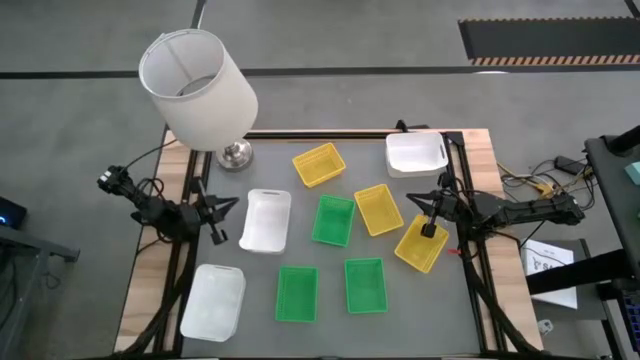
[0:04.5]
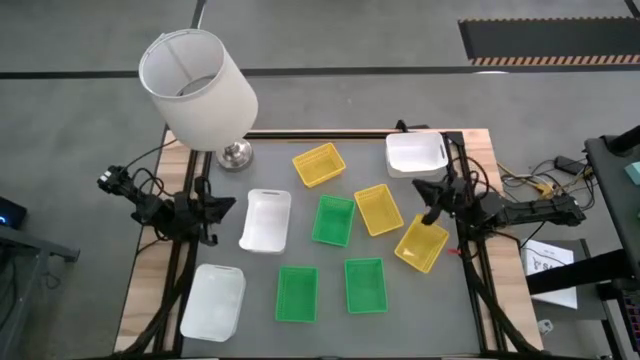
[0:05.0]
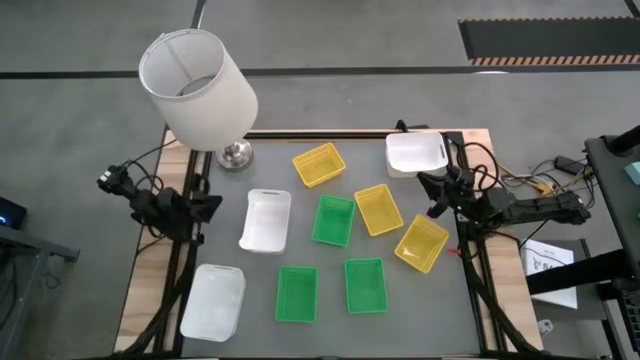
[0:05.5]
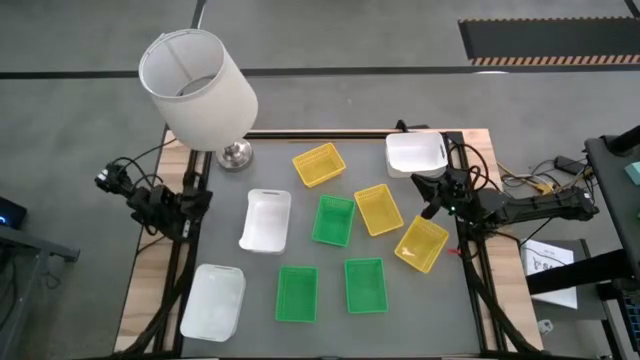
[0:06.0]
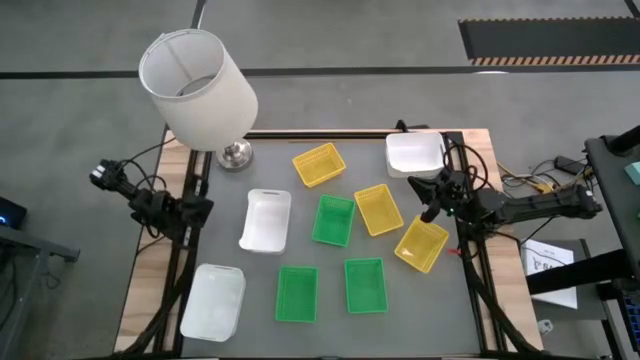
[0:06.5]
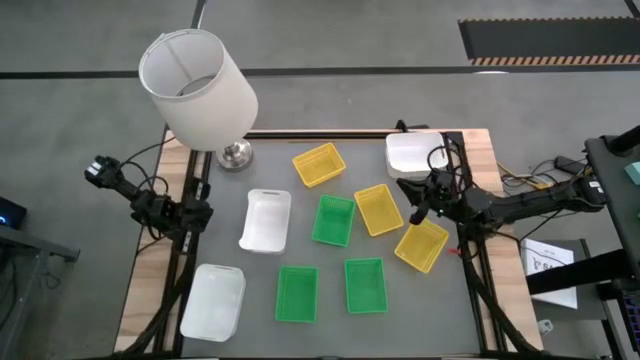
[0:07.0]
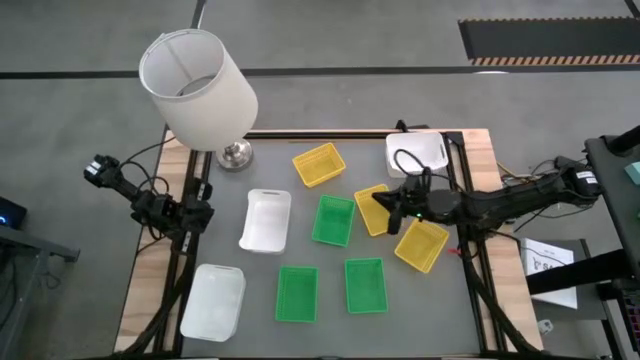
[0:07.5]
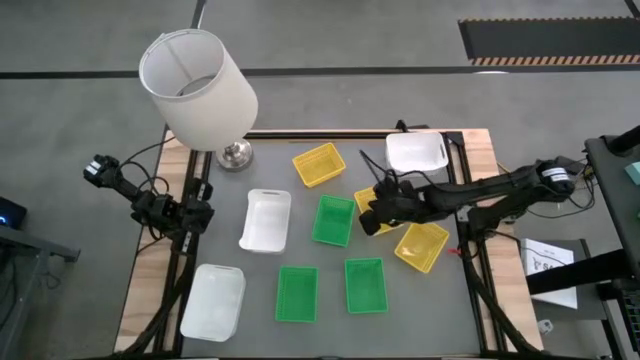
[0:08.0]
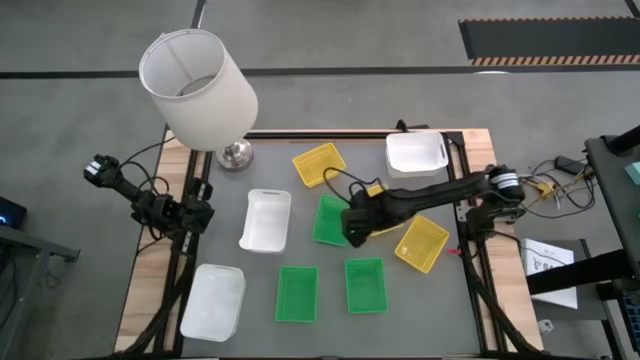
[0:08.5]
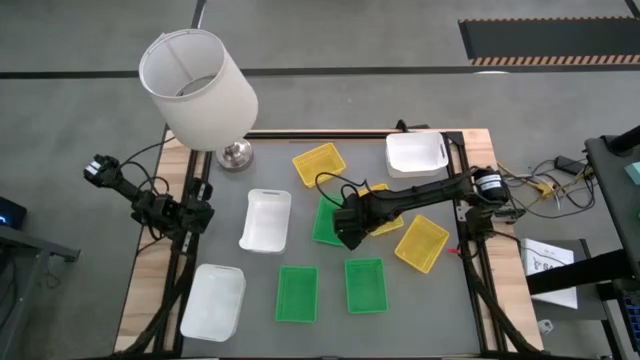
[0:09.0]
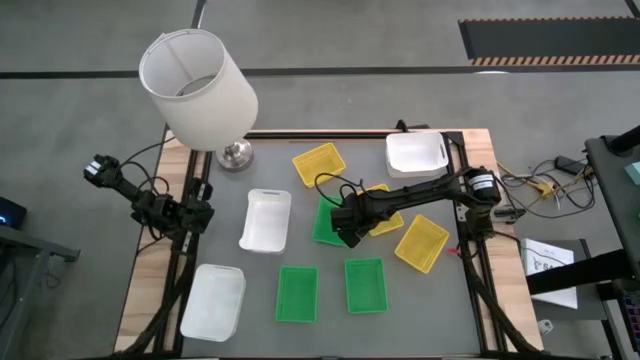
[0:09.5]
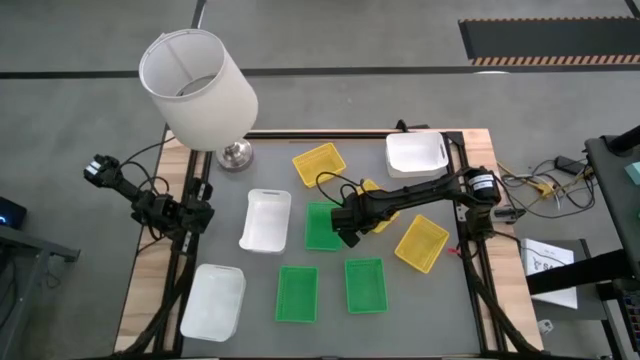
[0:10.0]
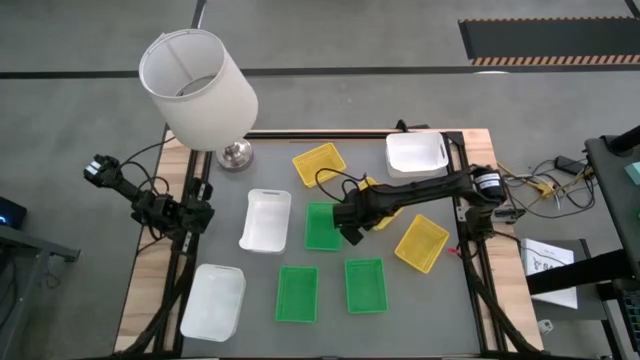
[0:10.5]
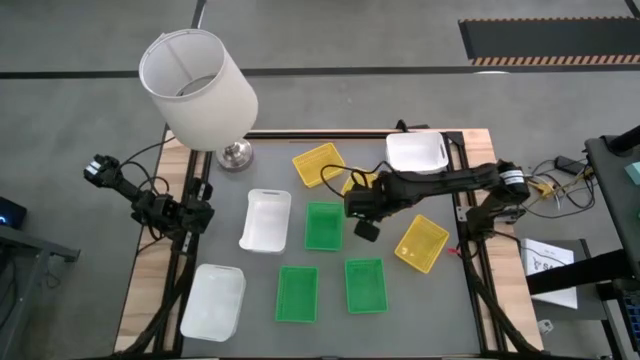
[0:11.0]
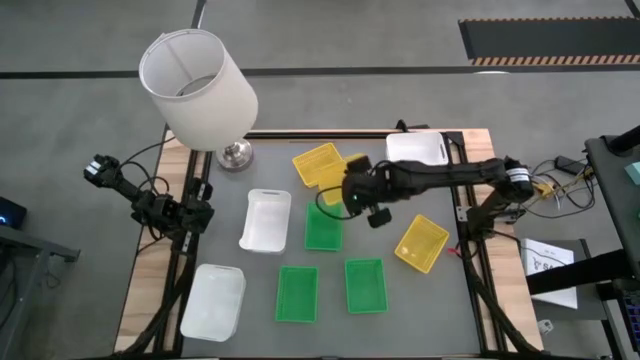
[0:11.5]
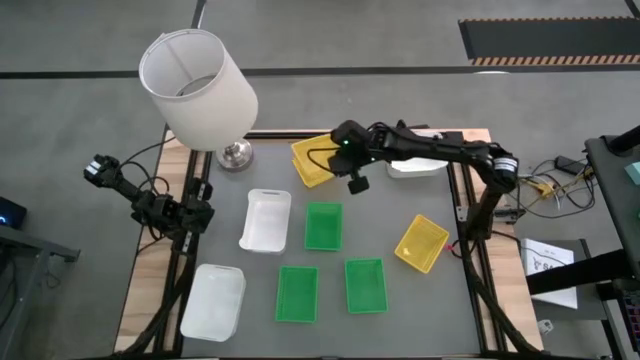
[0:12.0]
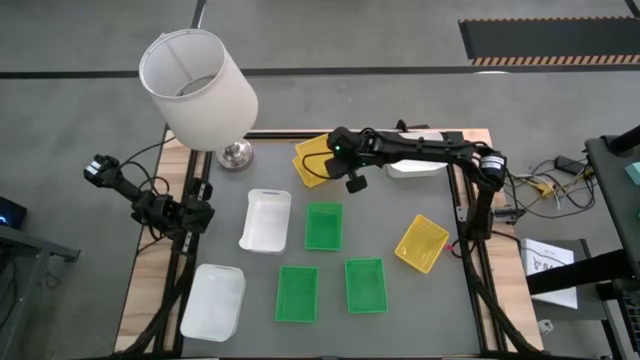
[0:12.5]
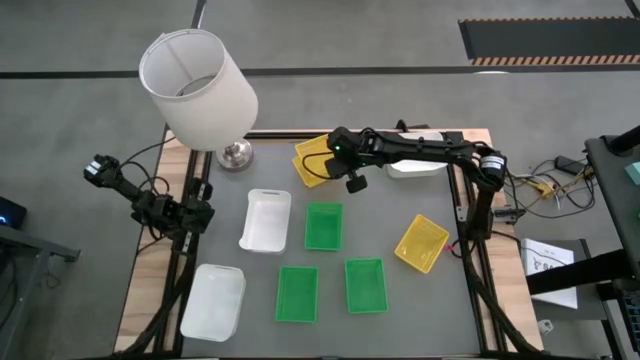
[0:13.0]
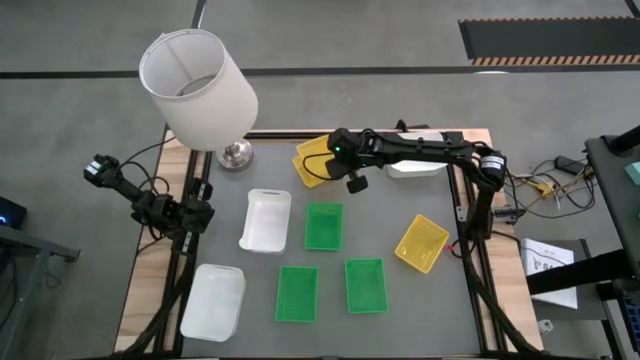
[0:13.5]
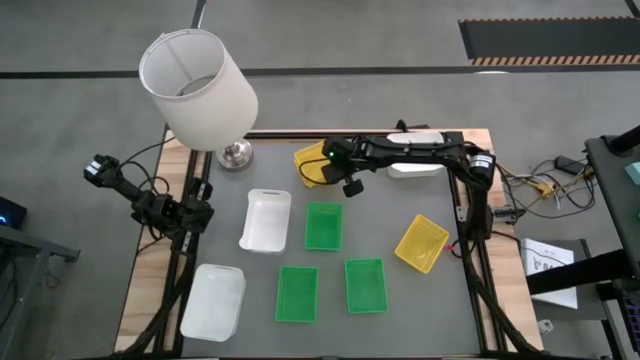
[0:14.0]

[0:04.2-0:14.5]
Stack the middle yellow bin on the left yellow bin

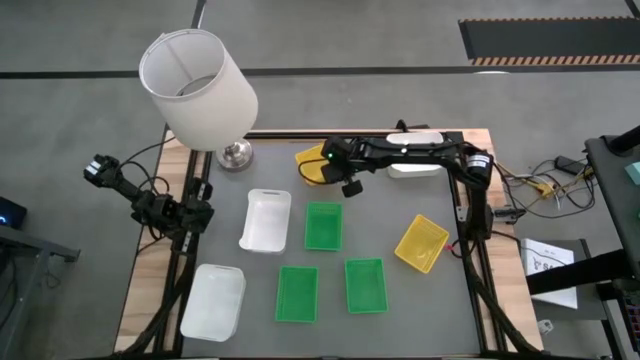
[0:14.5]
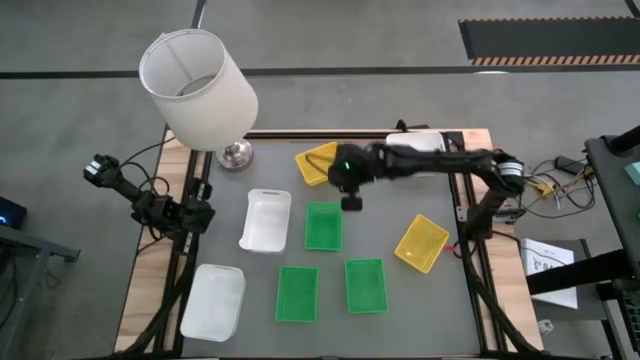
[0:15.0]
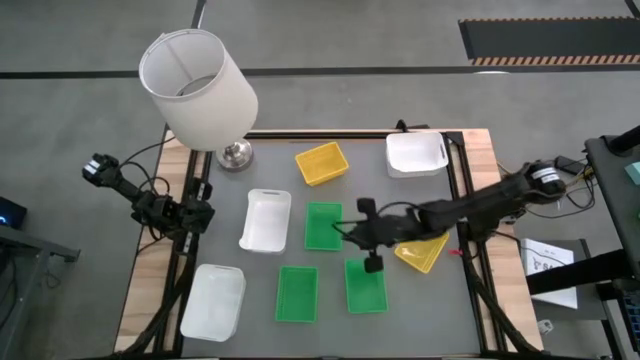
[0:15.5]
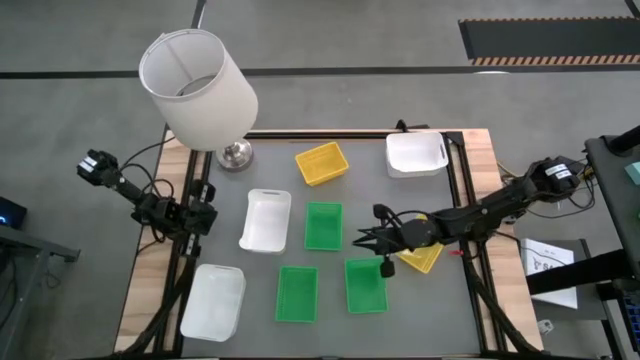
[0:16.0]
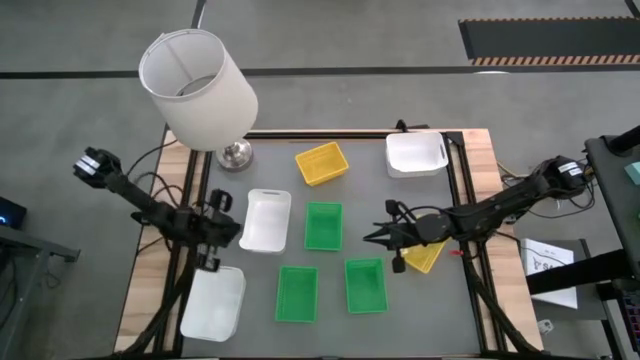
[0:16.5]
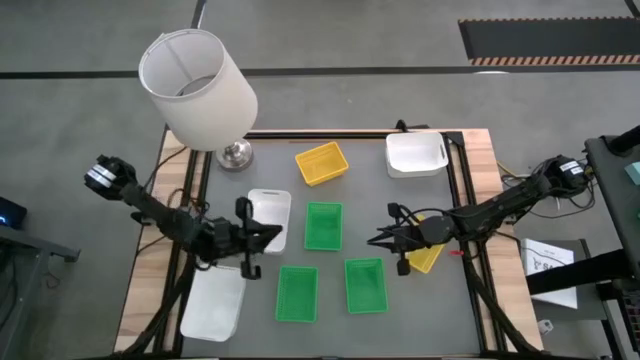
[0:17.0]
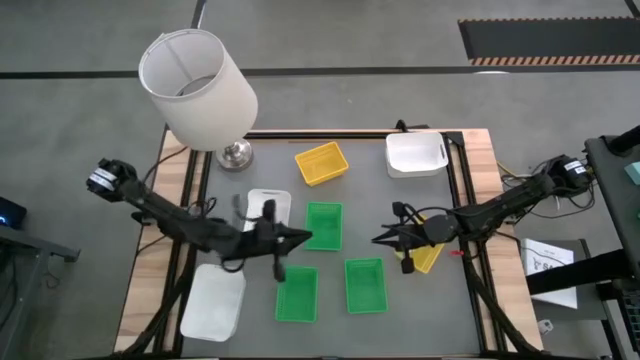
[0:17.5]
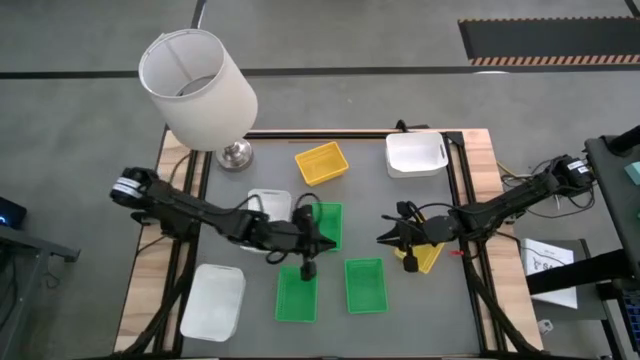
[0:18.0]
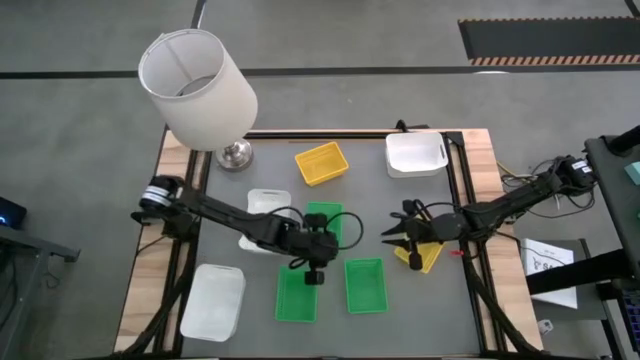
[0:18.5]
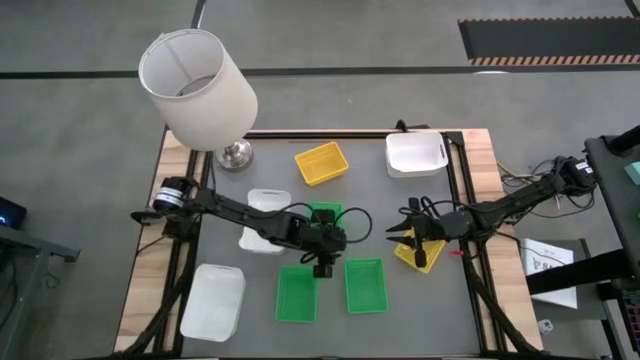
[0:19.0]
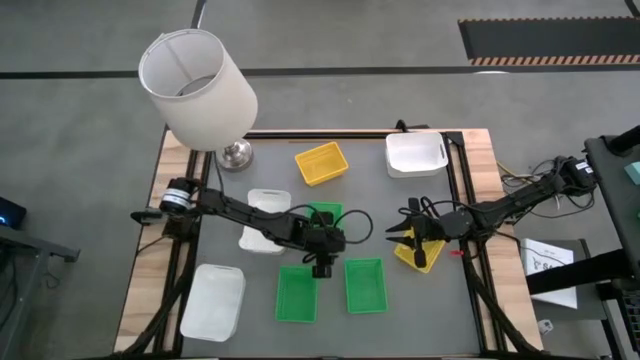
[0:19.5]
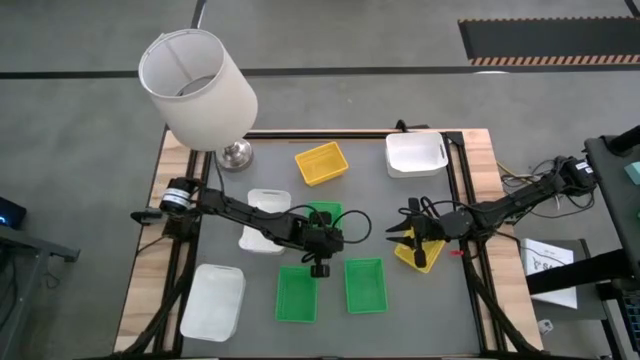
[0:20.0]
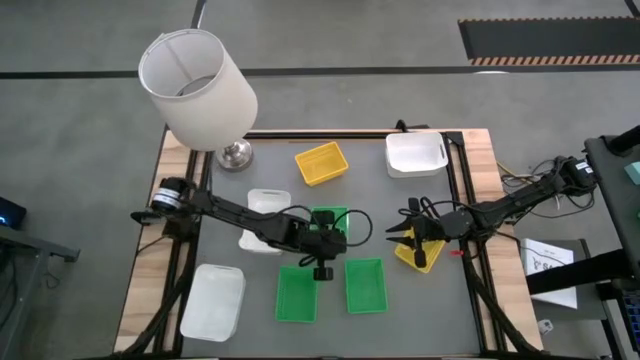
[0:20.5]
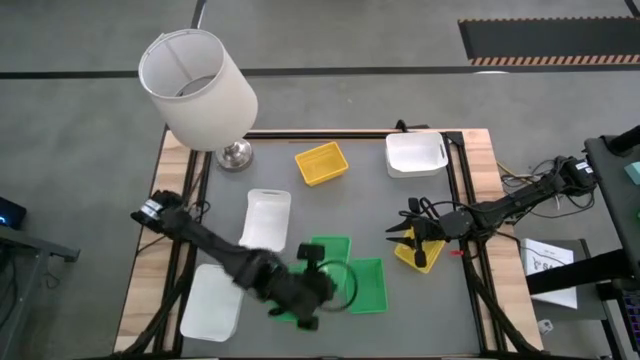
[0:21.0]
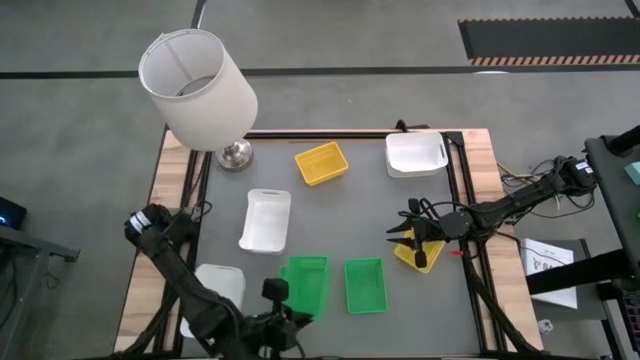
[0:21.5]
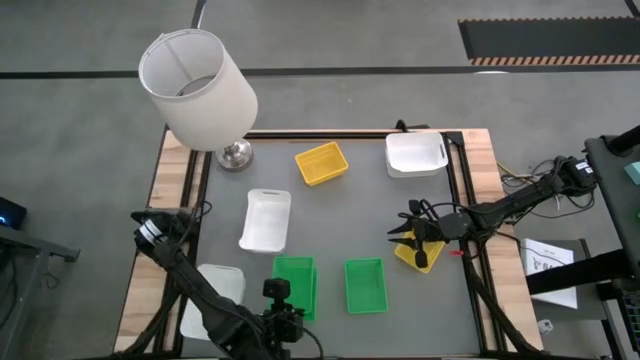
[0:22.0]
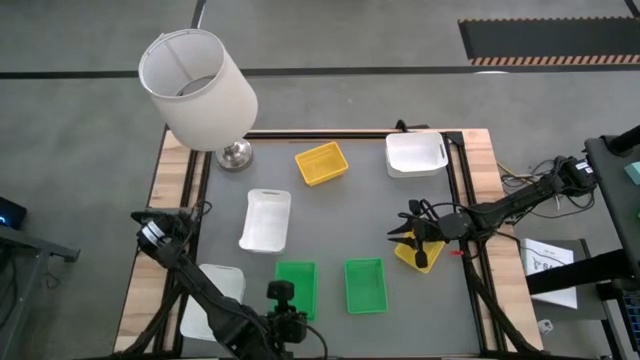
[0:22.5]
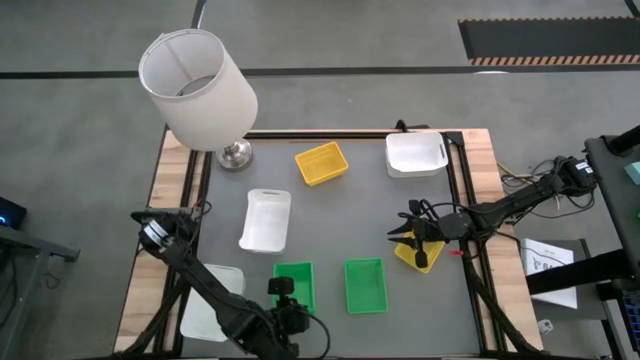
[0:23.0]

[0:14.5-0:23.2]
Stack the top left green bin on the bottom left green bin
